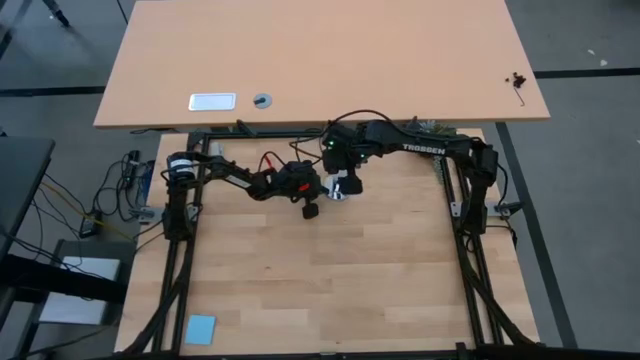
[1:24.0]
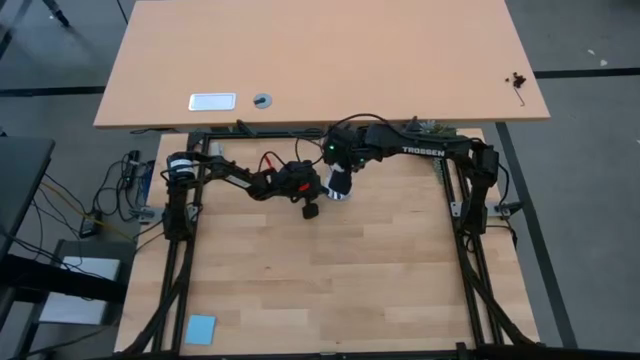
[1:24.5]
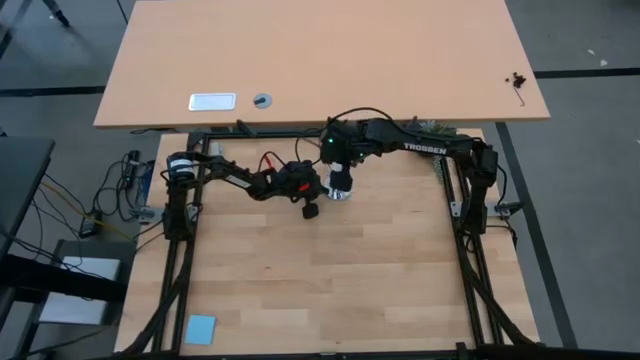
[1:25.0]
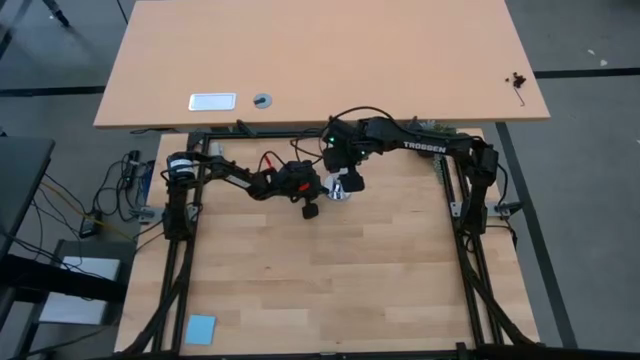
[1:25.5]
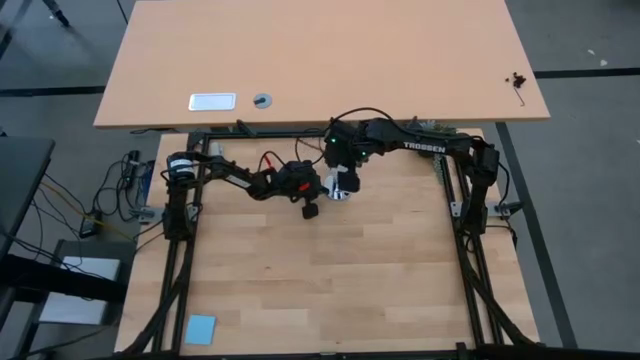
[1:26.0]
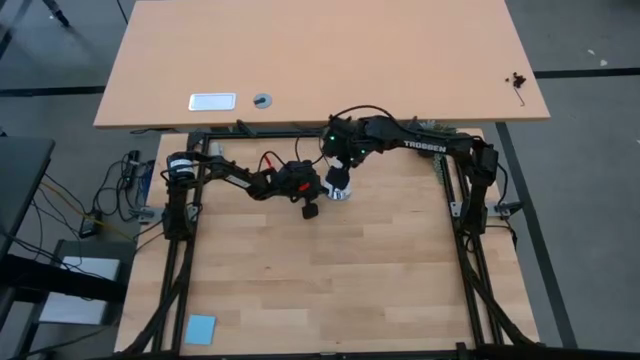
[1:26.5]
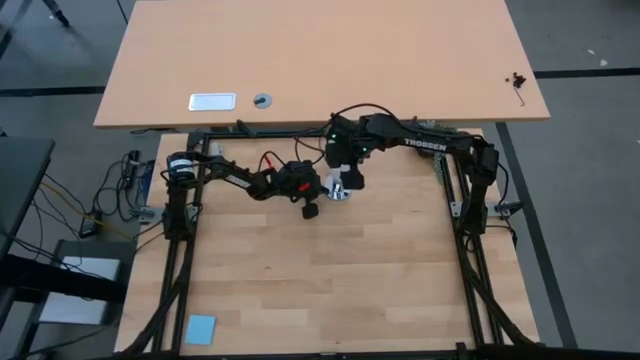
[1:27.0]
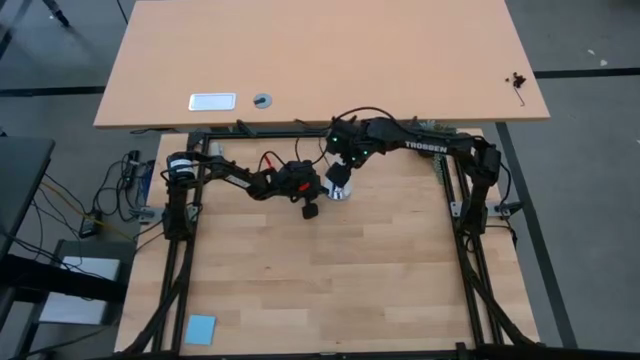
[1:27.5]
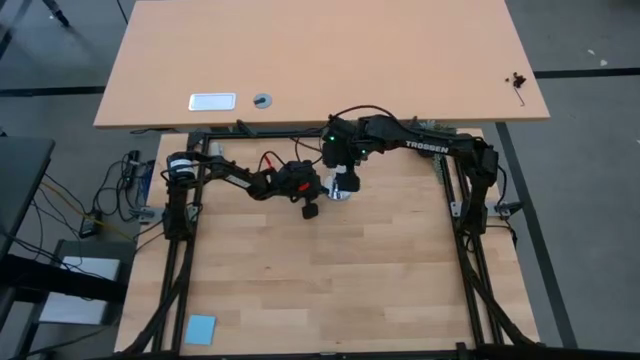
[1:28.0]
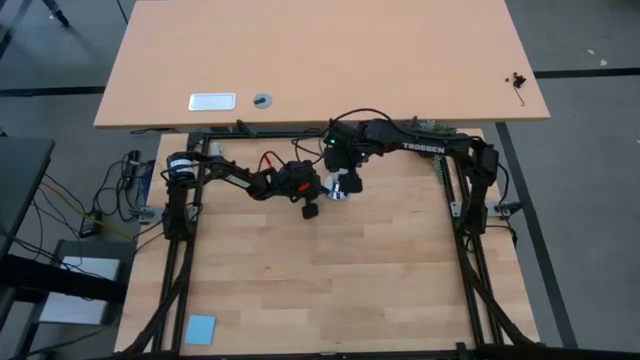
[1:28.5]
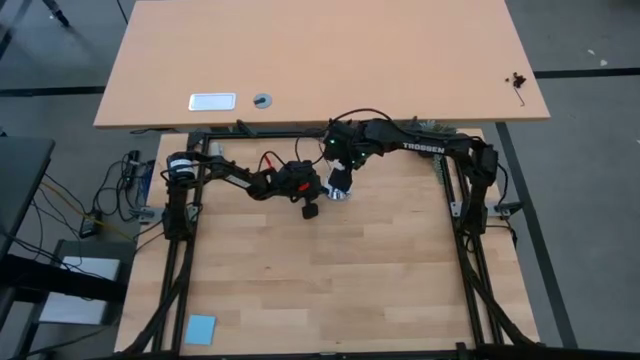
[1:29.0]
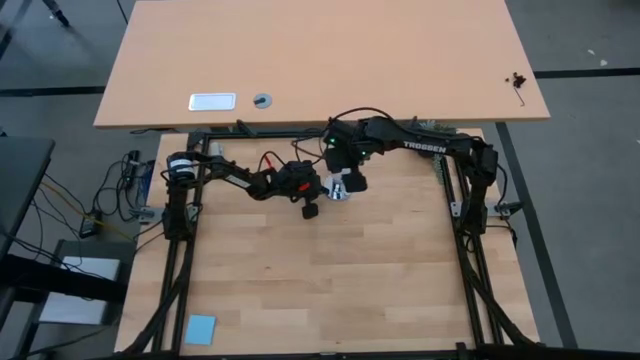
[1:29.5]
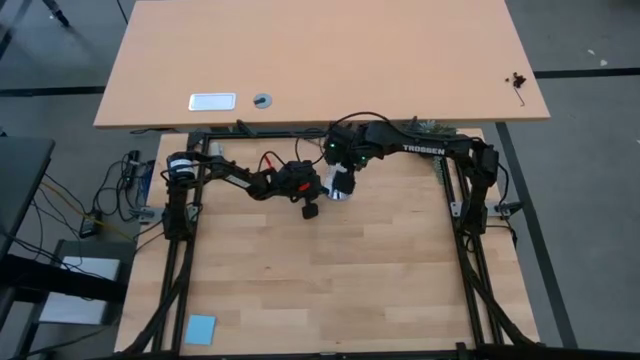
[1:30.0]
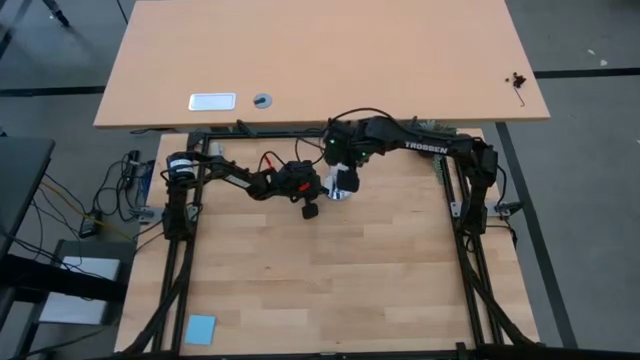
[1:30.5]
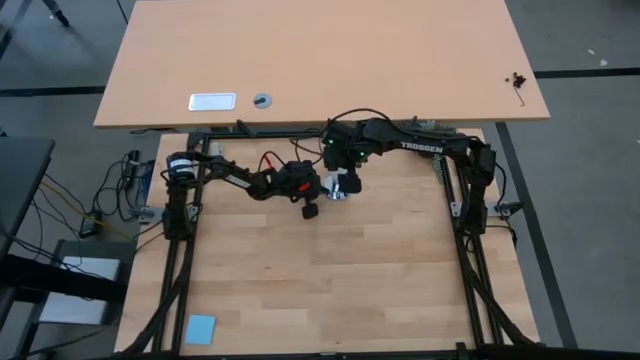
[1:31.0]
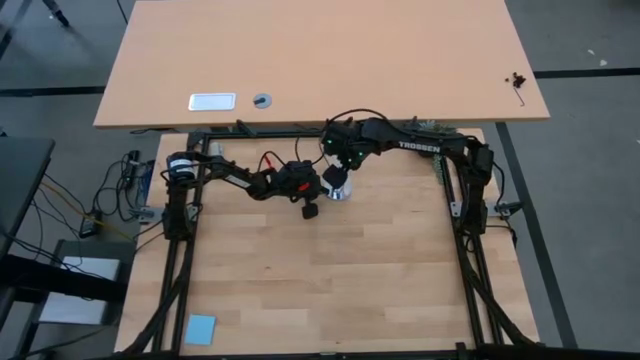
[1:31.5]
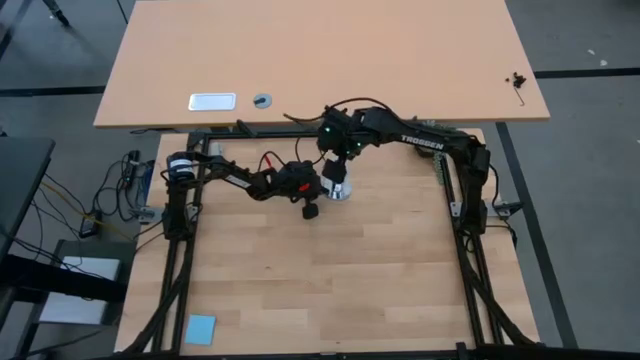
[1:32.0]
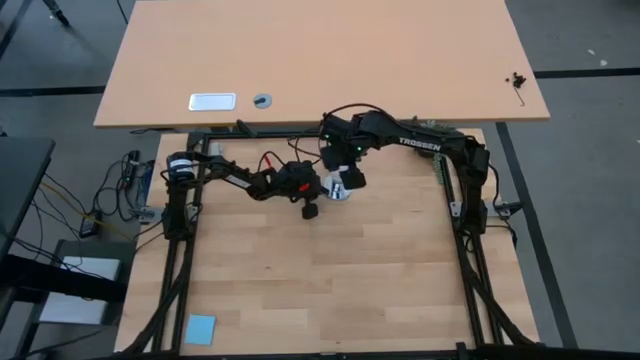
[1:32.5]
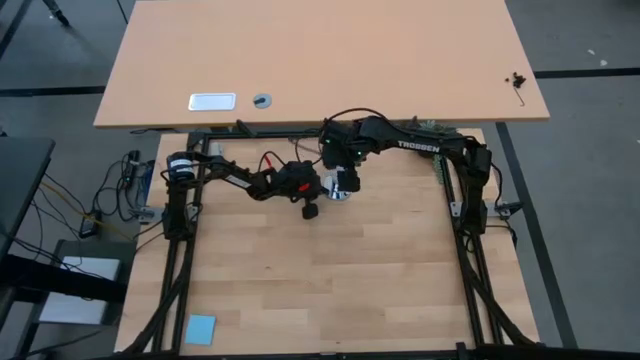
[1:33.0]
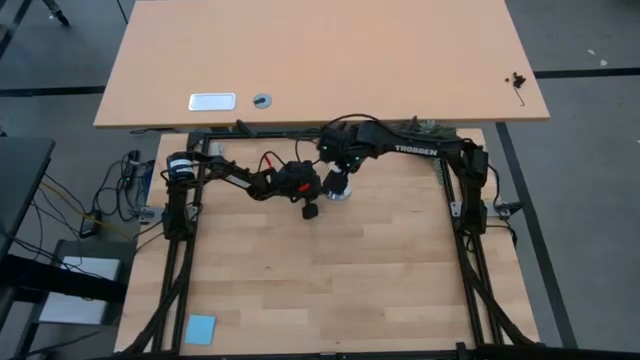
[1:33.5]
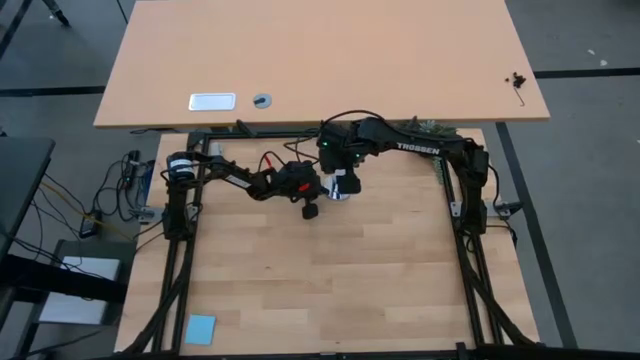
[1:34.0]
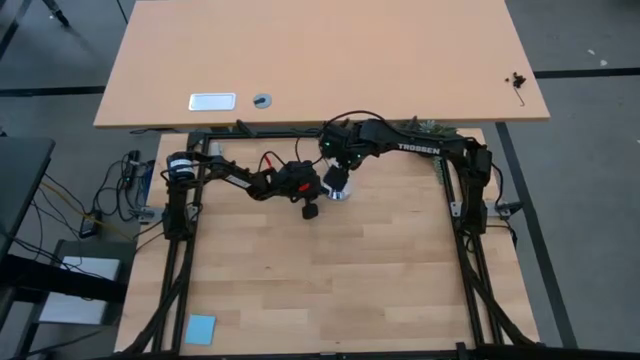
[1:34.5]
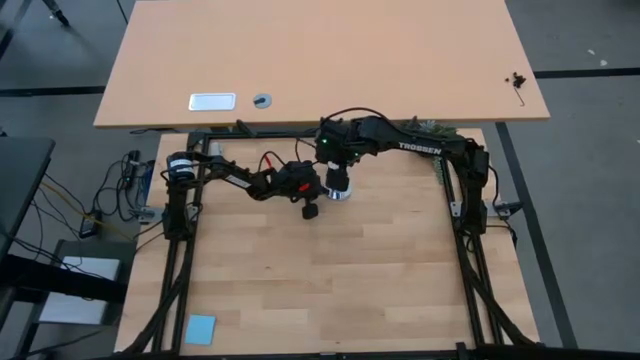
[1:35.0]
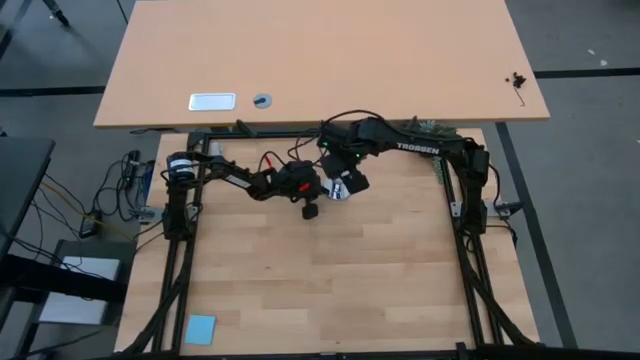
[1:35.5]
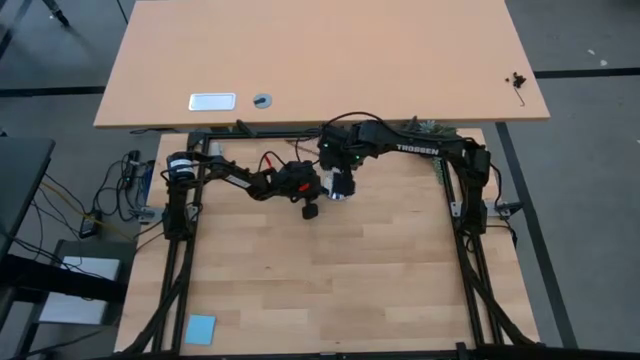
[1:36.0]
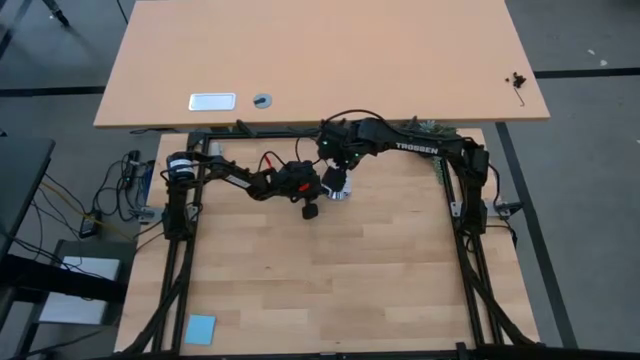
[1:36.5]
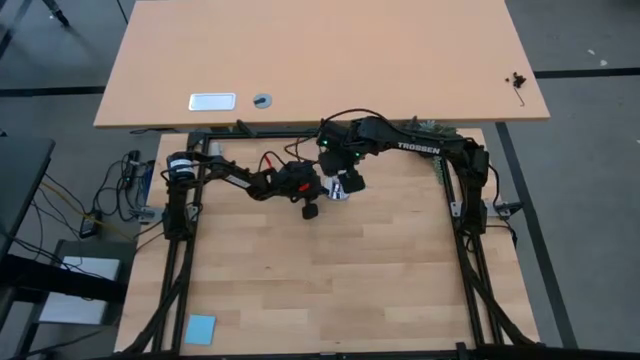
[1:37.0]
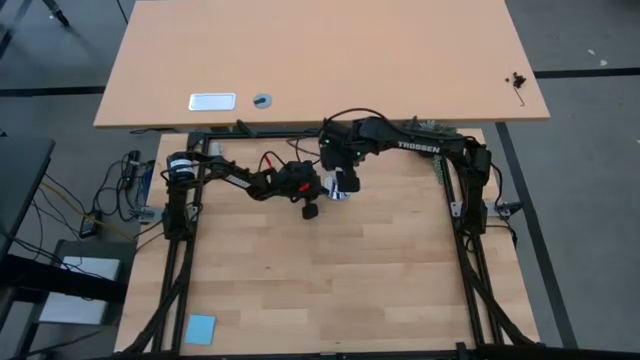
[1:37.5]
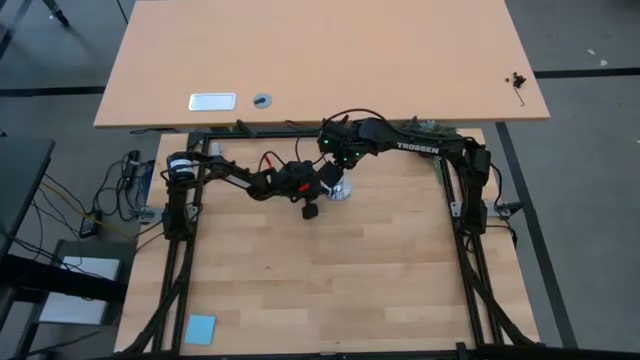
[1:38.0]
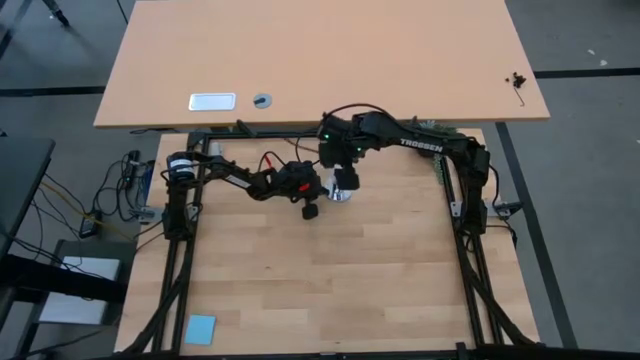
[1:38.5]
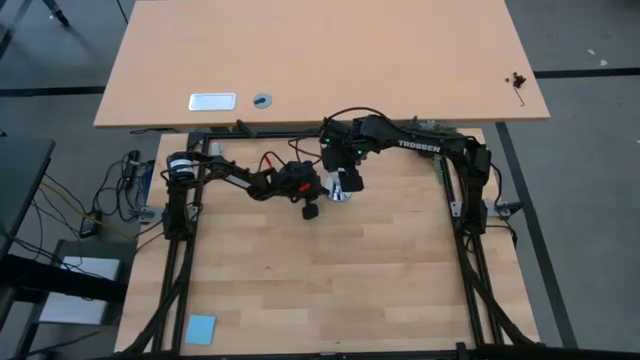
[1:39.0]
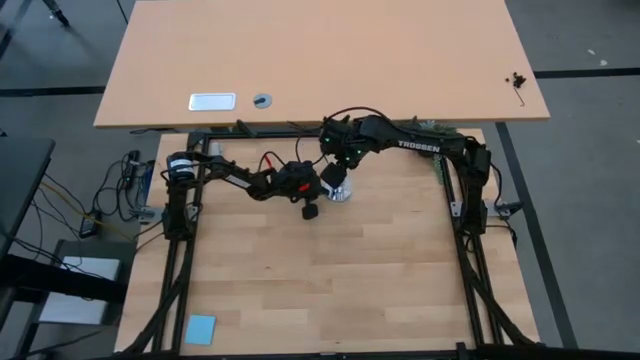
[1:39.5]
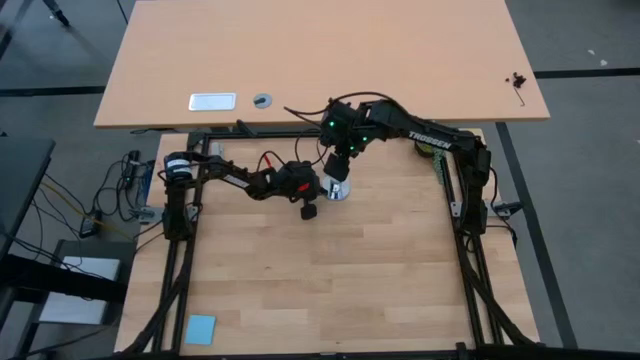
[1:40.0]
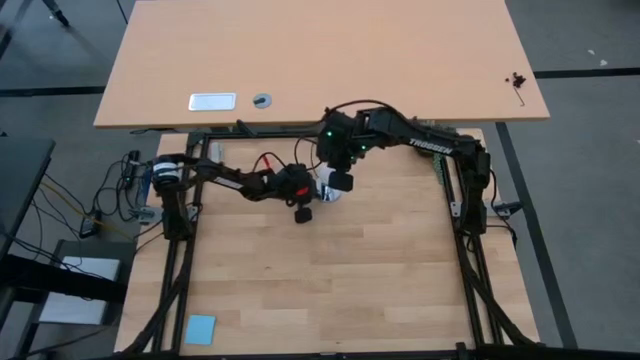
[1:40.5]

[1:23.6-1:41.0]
Task: Screw lightbulb
Insert the lightbulb into the lamp

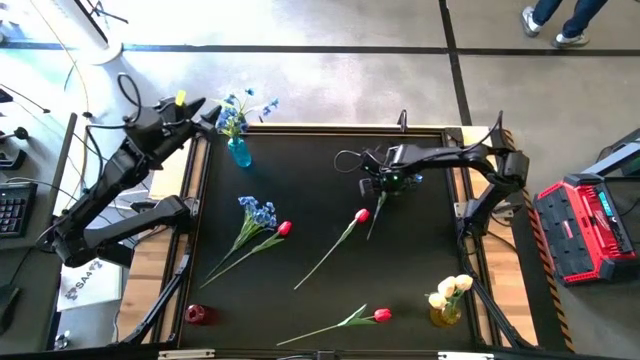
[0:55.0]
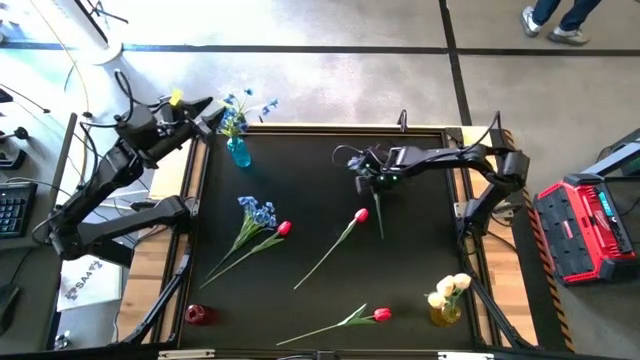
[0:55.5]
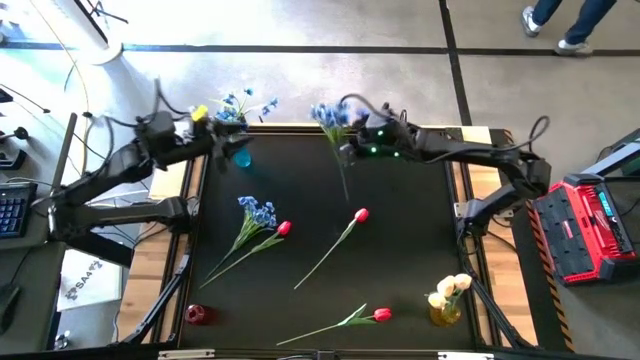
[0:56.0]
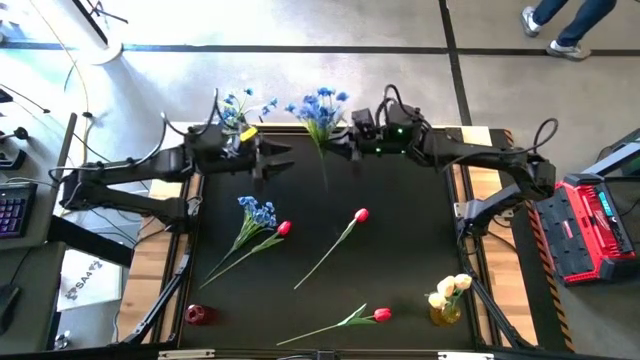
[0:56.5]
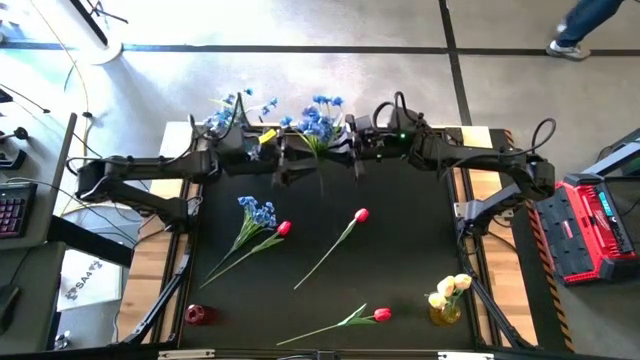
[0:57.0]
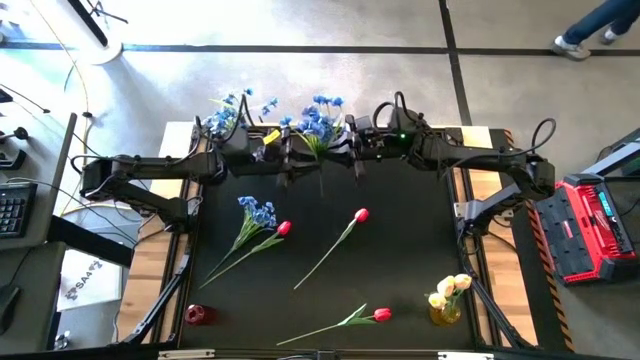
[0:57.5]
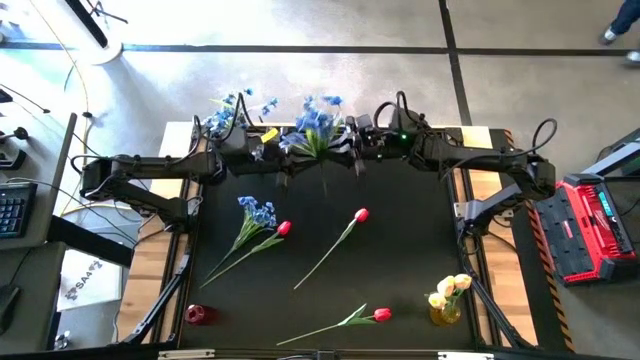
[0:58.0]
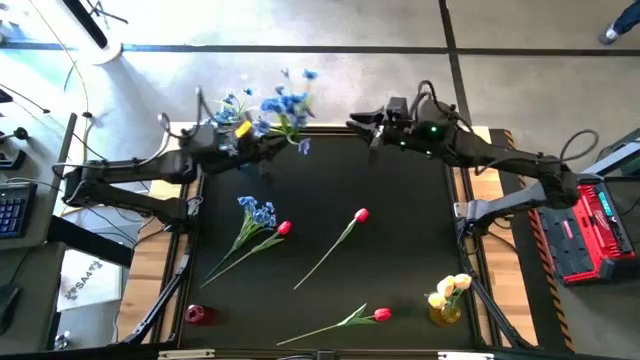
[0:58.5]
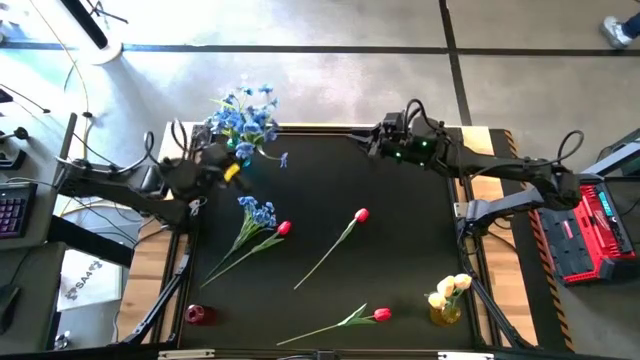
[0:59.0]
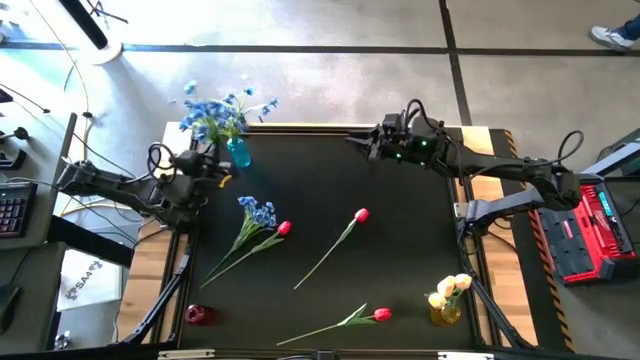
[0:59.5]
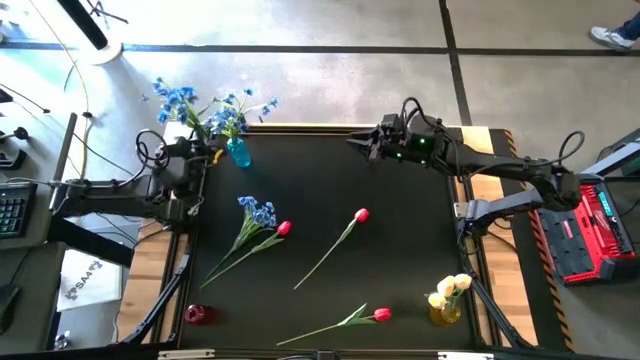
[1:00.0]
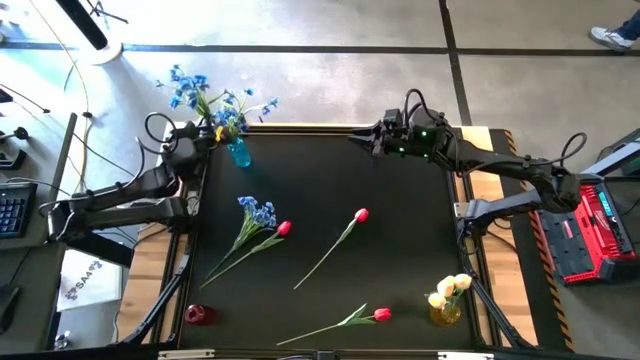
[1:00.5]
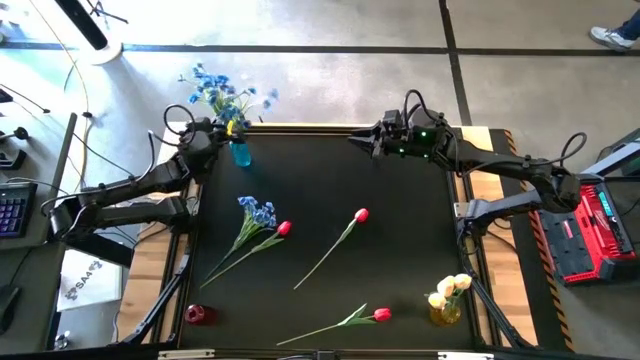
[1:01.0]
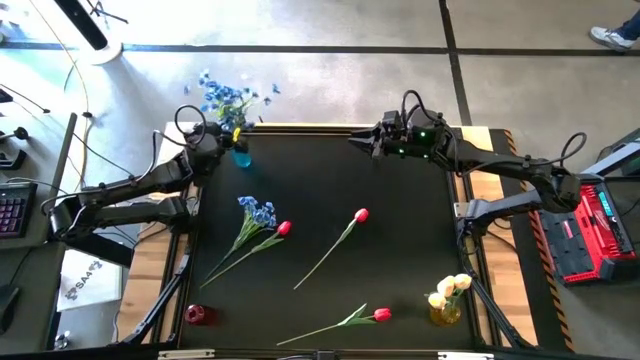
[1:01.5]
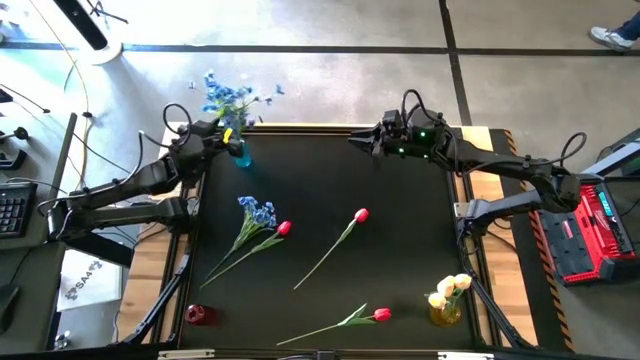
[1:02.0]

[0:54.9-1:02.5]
Task: Sort flowers into vase by color
Put the right blue flowers into the blue vase
